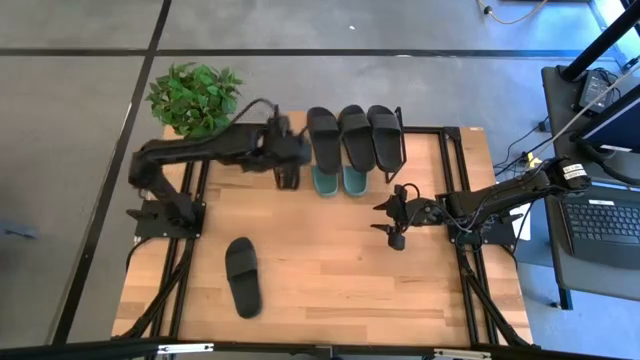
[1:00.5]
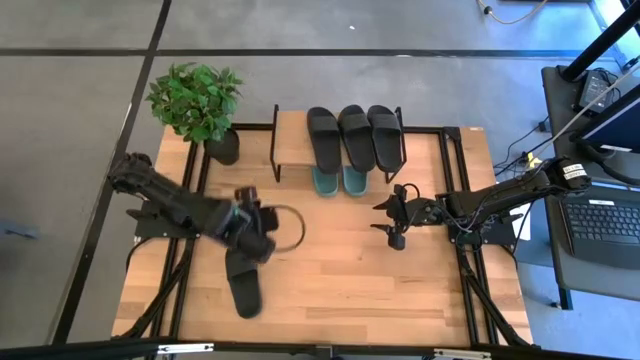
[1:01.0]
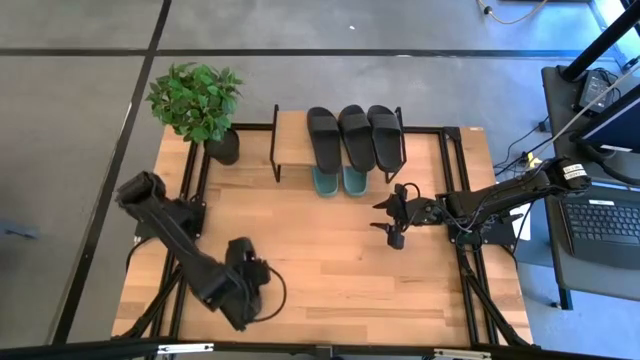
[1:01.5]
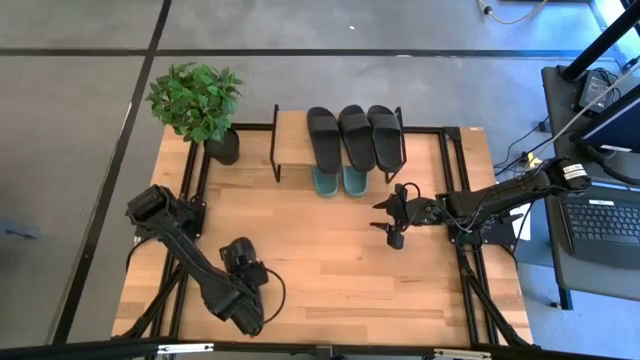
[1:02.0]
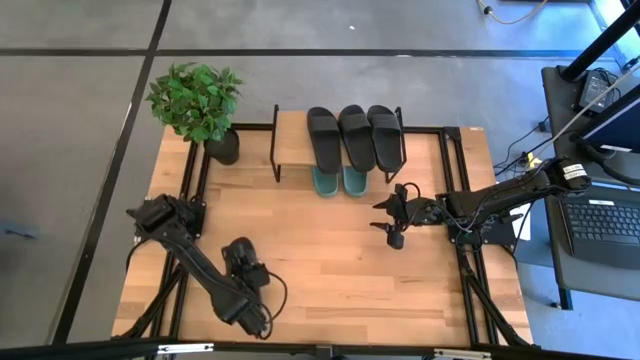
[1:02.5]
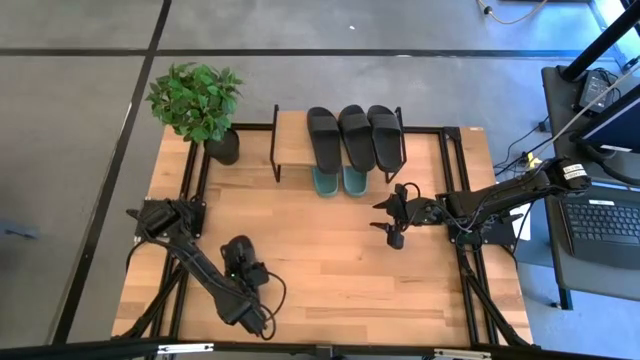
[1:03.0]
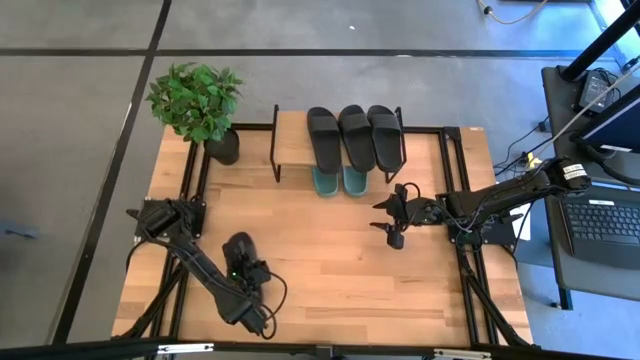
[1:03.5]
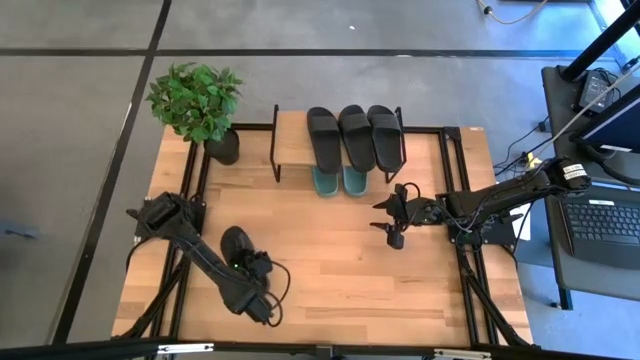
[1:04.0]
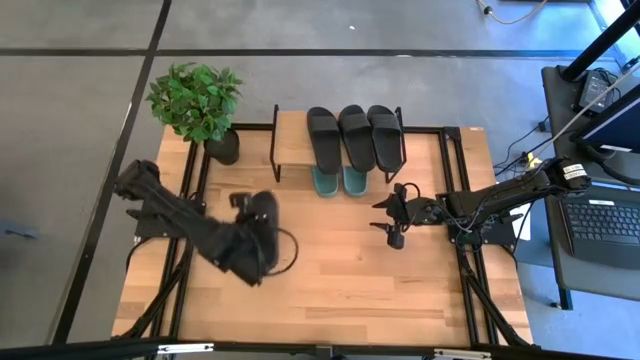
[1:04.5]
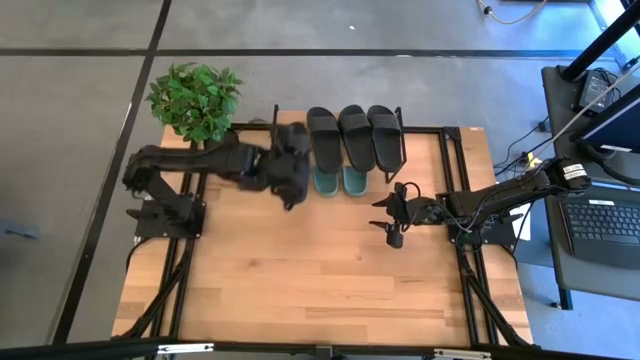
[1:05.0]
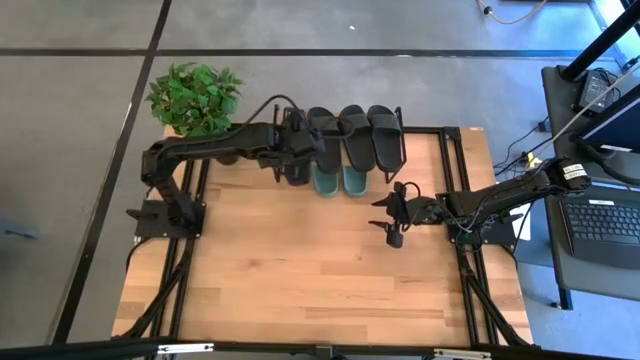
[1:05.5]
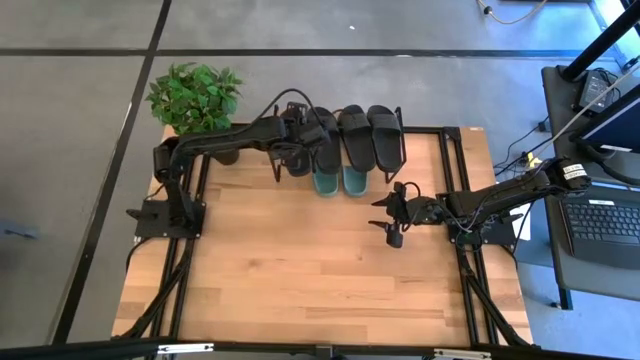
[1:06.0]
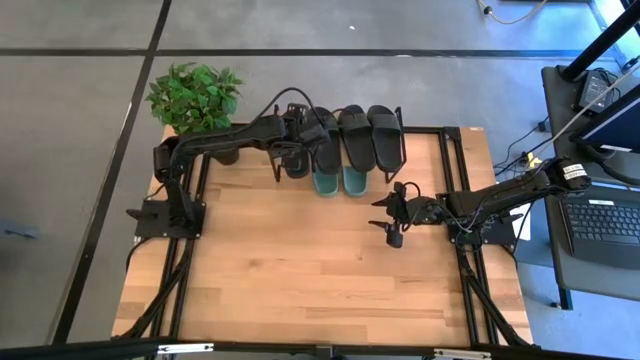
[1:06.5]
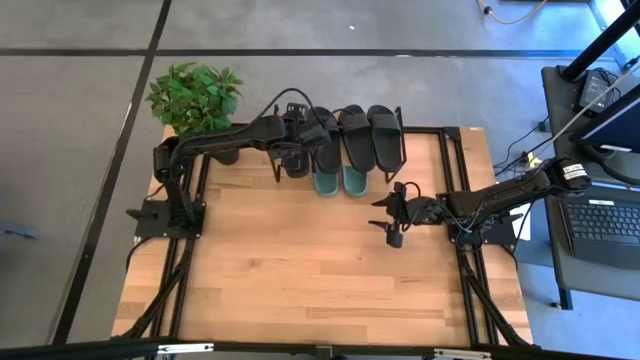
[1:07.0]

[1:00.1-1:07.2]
Task: Pick and place slides into the shelf
Put the black slide on the shelf

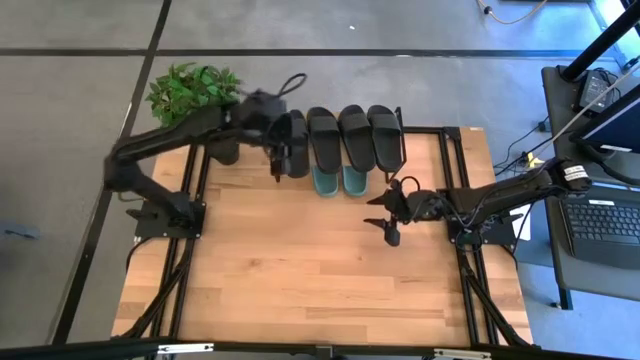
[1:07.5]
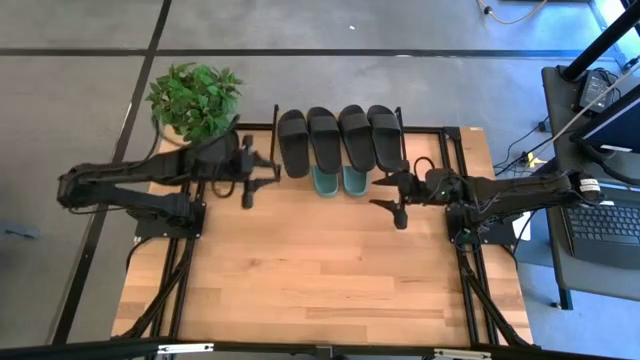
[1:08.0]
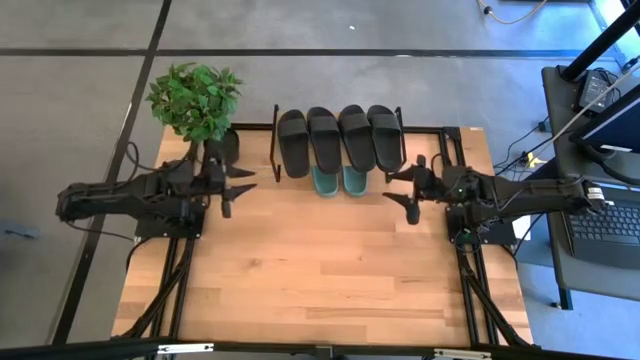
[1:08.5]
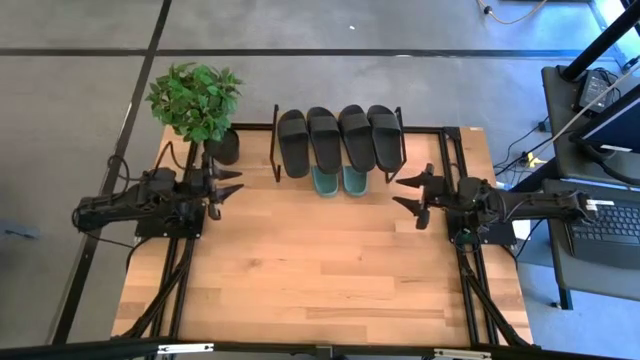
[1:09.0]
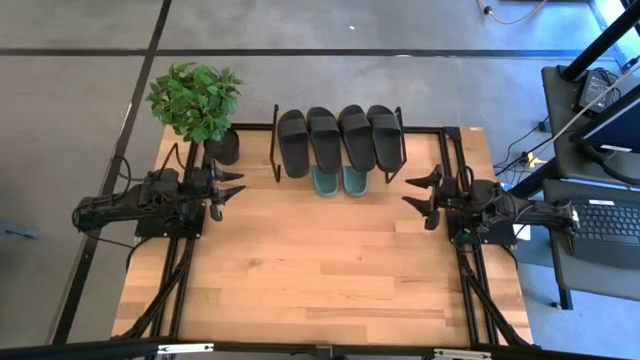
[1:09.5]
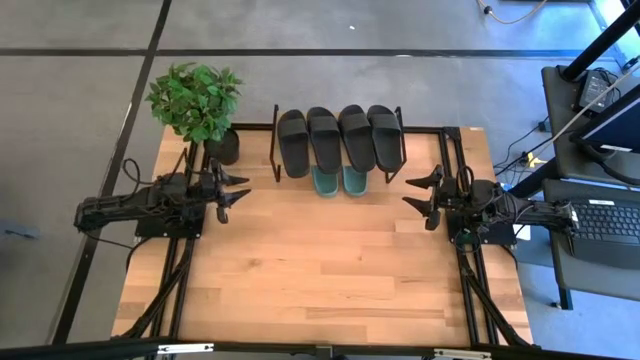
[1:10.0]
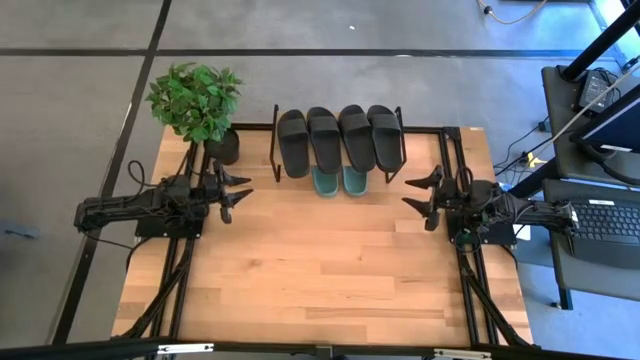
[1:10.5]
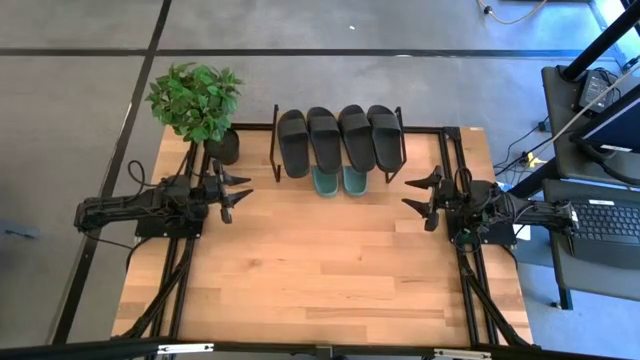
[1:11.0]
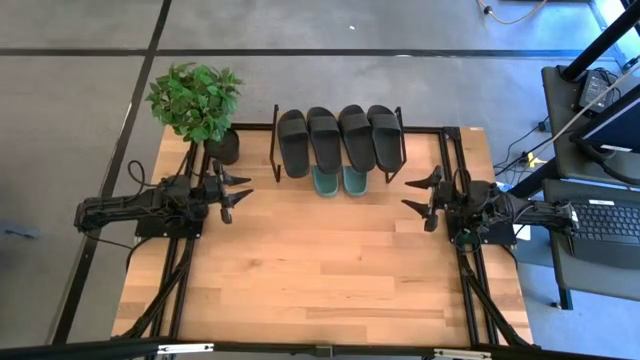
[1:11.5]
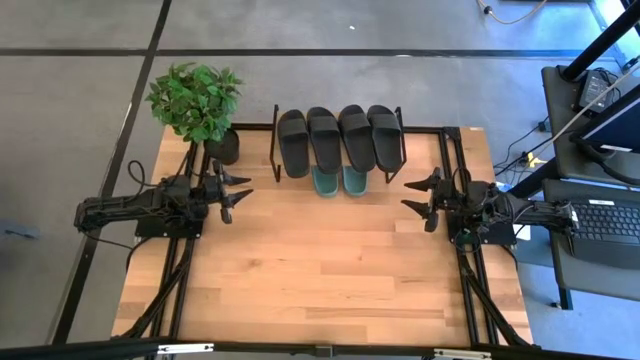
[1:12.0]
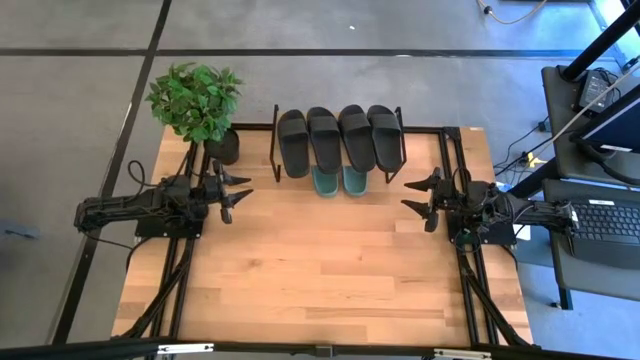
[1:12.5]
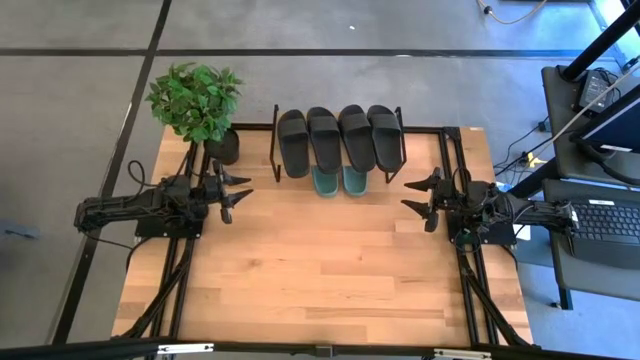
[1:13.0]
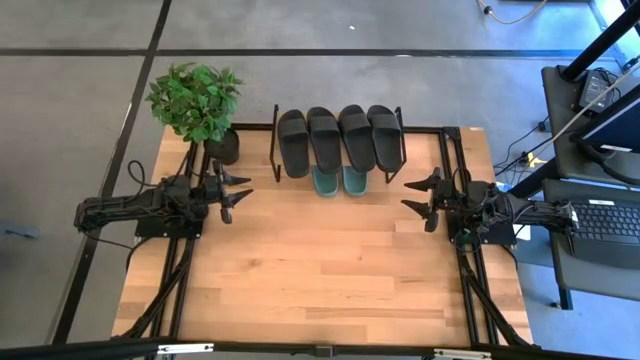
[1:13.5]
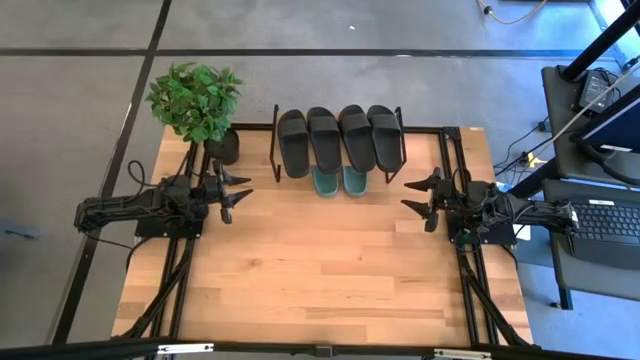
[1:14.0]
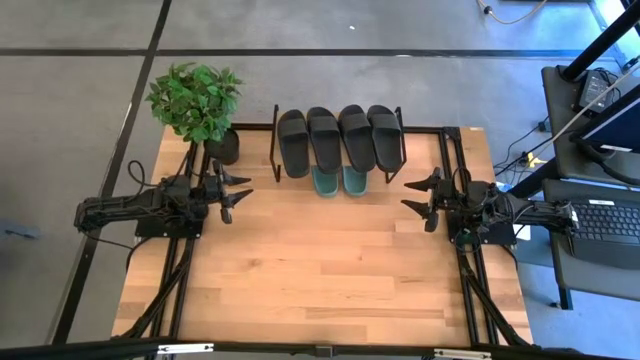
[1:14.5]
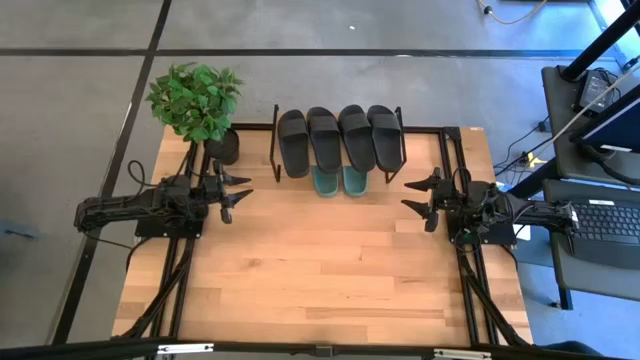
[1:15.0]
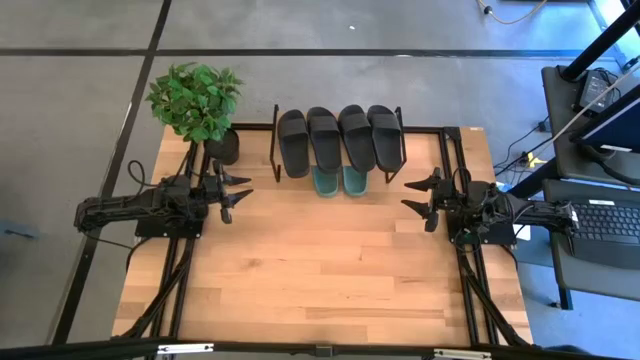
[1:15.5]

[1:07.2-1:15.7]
Return to Home Position

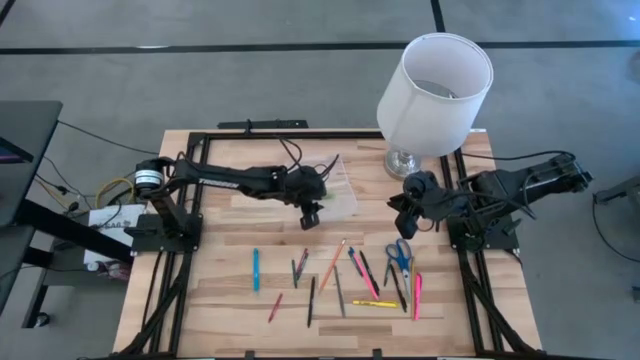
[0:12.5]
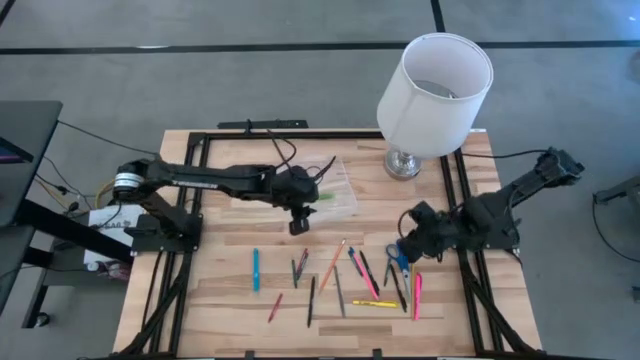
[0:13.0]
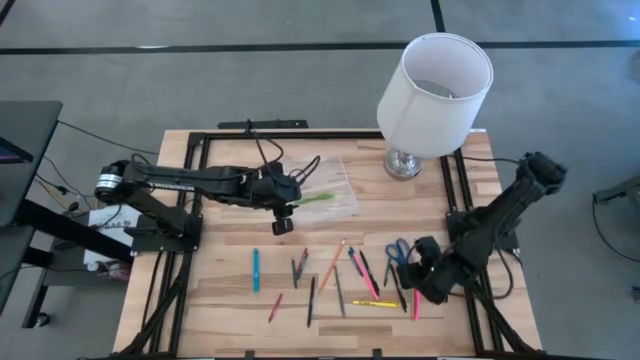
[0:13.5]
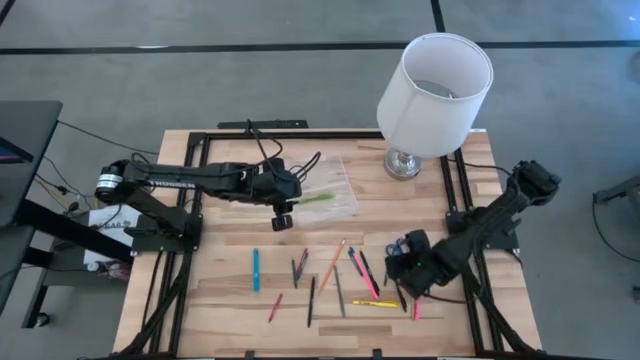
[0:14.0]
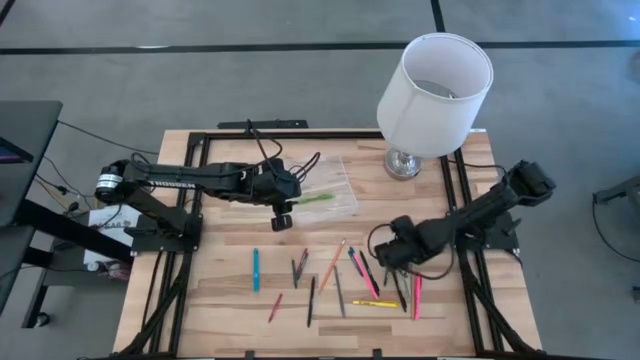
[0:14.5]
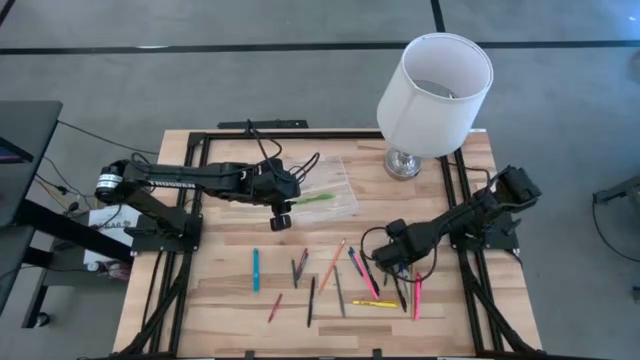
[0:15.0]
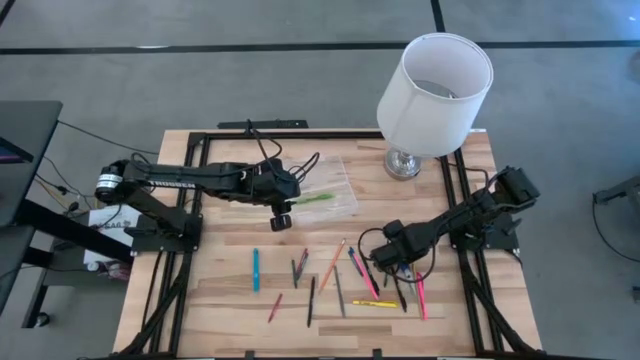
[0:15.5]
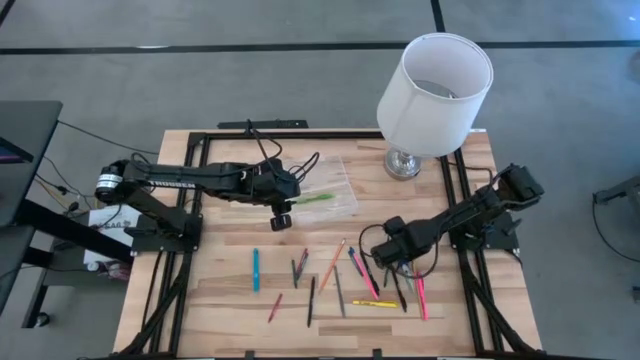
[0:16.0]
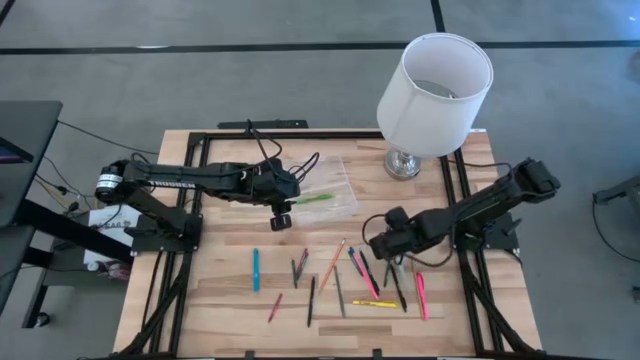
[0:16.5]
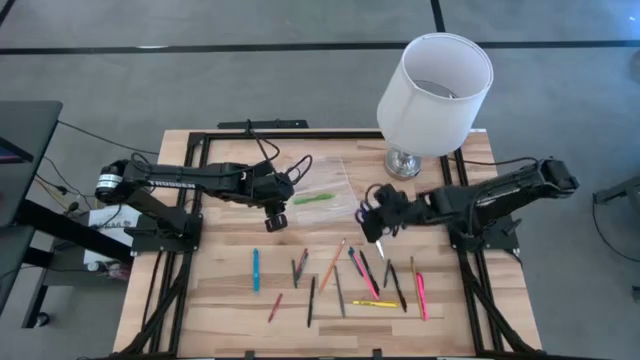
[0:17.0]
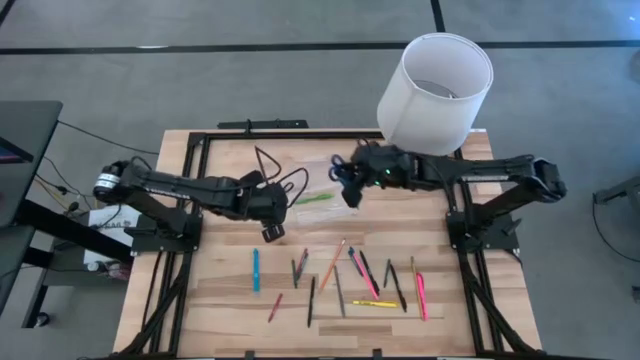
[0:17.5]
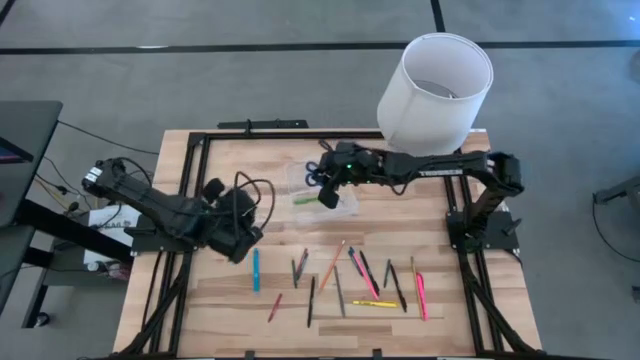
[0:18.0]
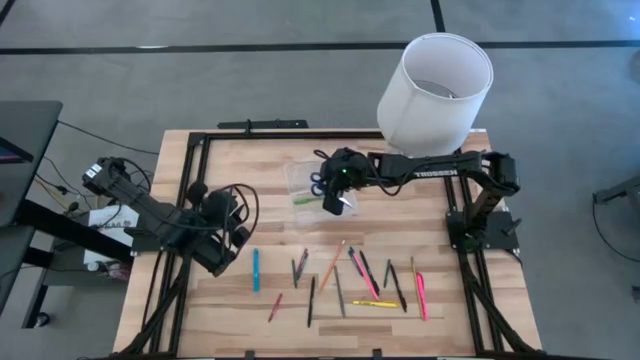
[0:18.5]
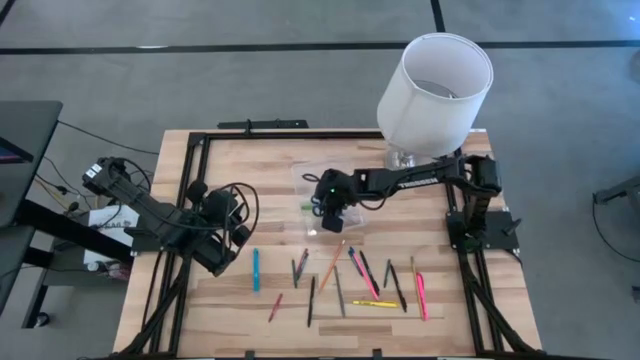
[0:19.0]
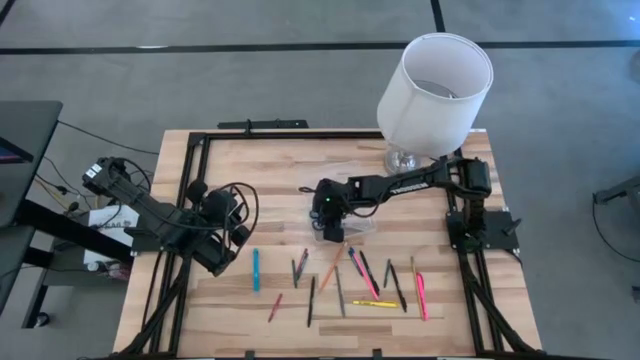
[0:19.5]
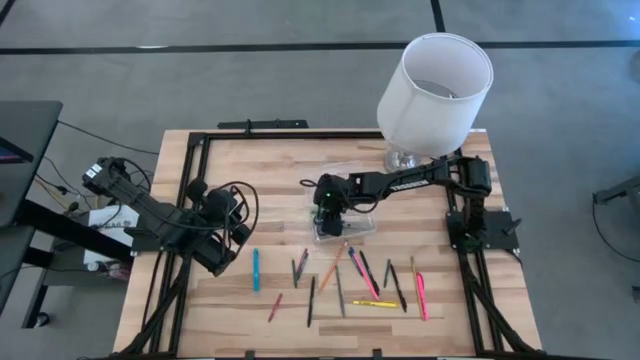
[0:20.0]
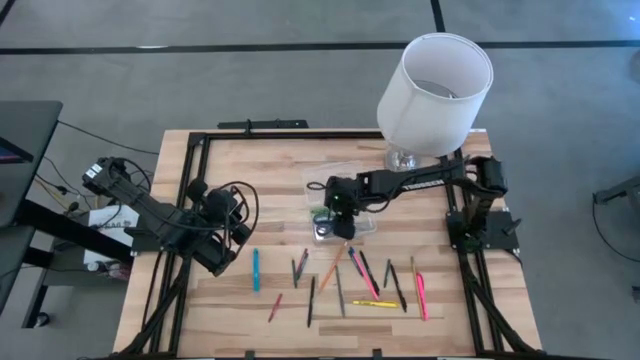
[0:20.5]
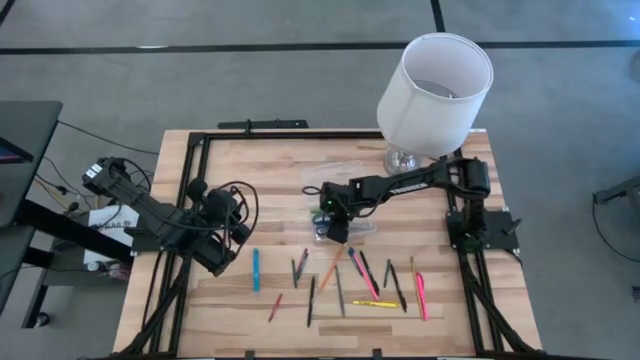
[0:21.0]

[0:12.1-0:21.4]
Task: Pick & place school supplies into a supply box
Put the blue scissors into the transparent supply box
